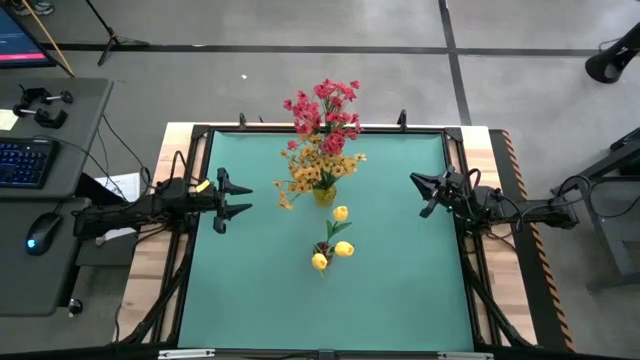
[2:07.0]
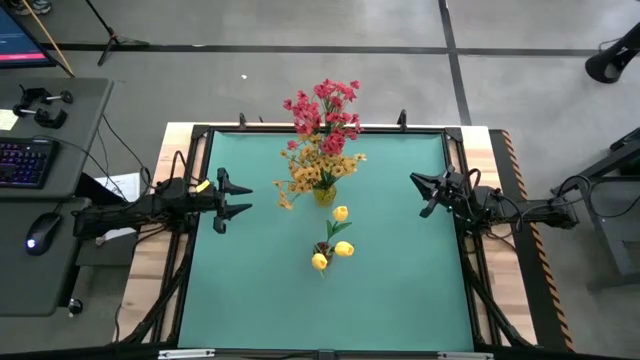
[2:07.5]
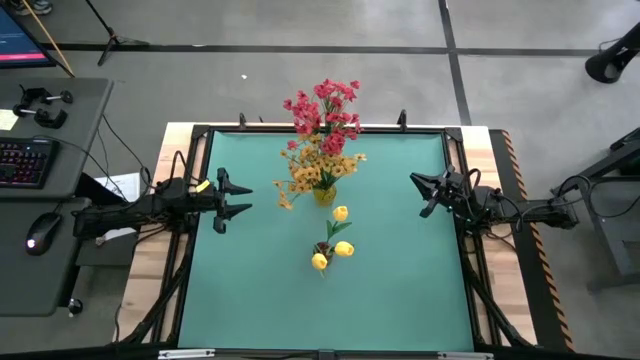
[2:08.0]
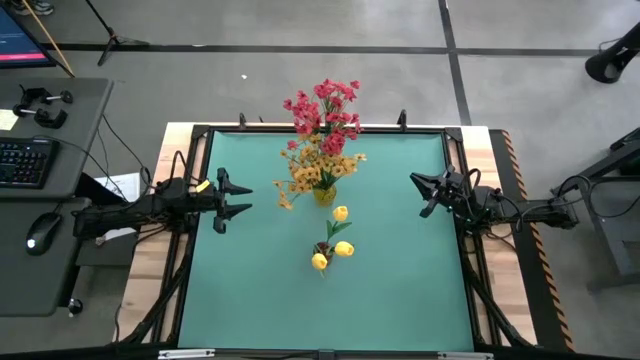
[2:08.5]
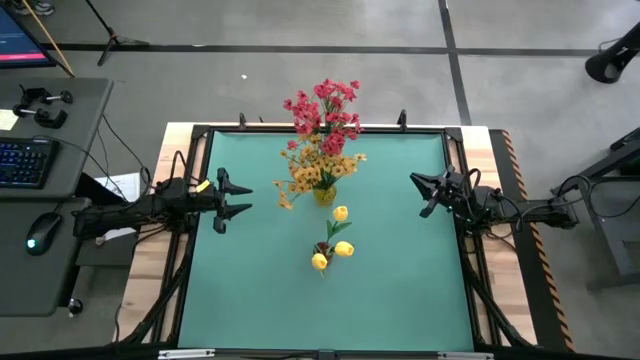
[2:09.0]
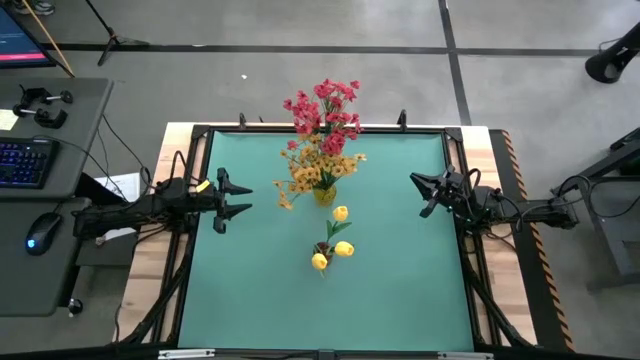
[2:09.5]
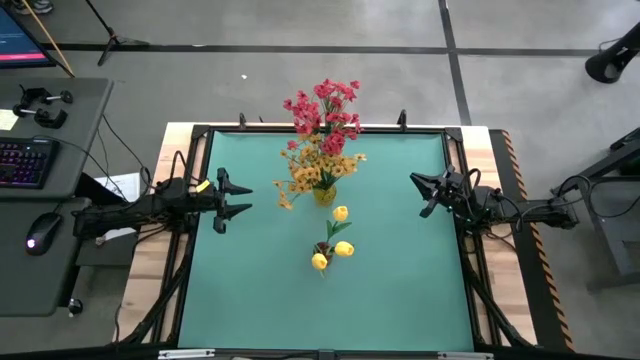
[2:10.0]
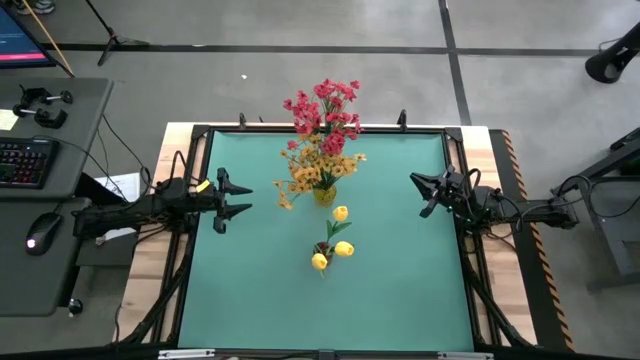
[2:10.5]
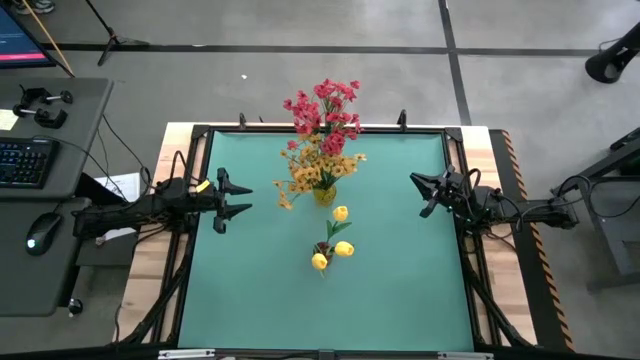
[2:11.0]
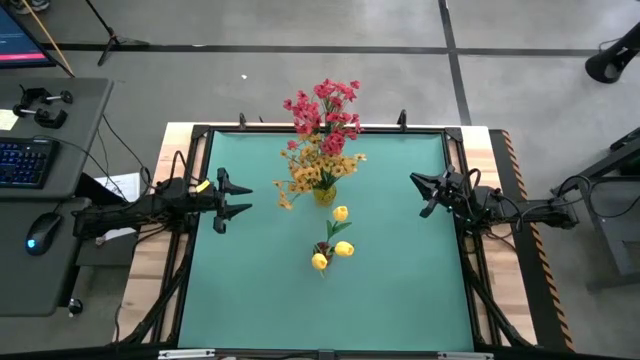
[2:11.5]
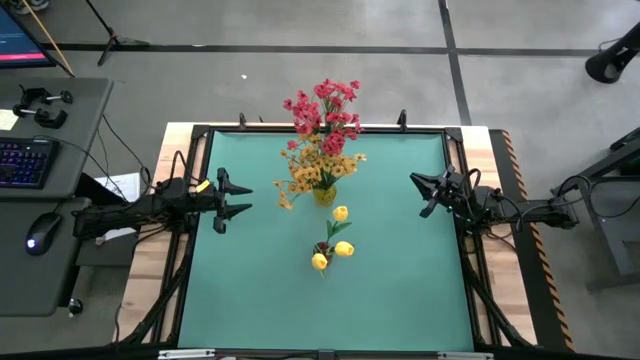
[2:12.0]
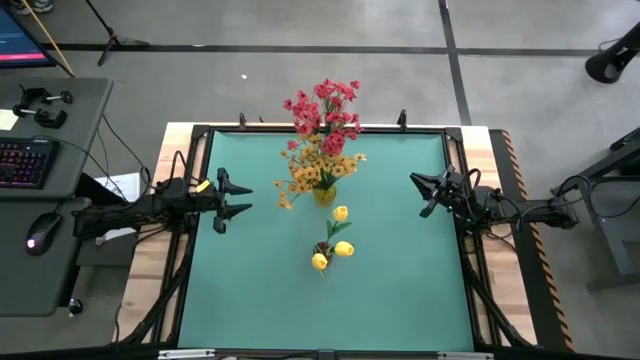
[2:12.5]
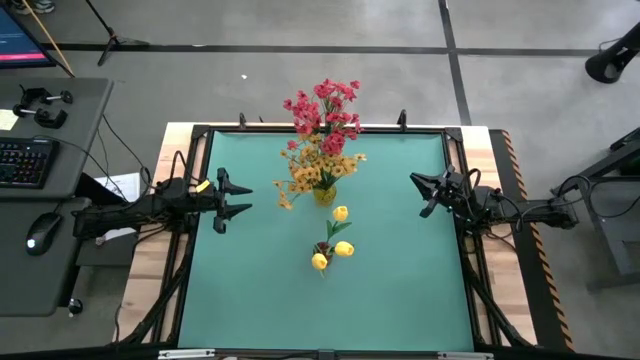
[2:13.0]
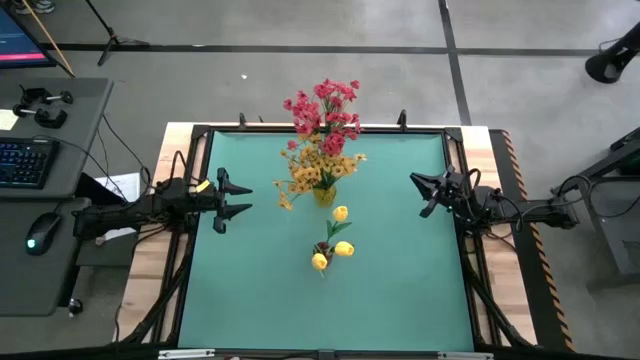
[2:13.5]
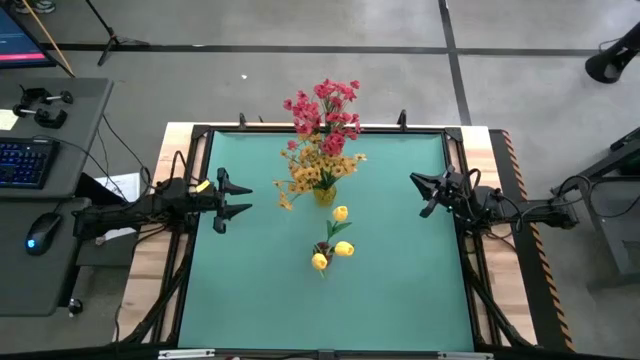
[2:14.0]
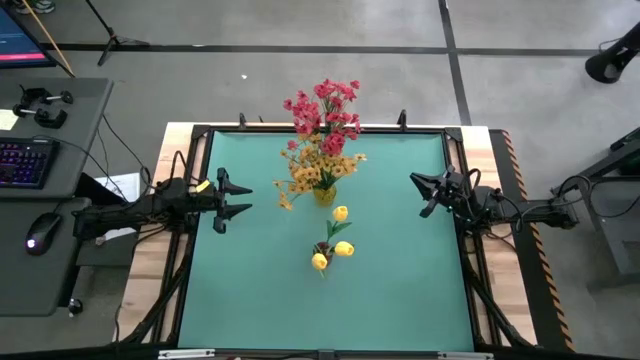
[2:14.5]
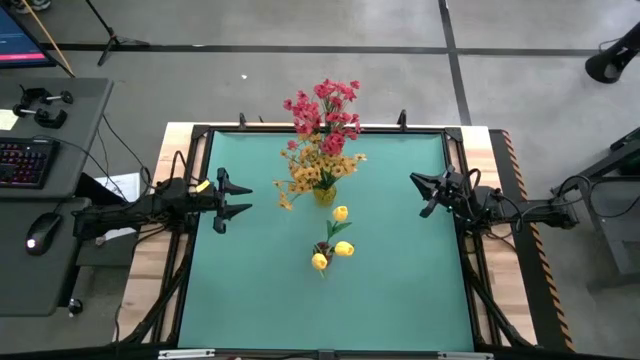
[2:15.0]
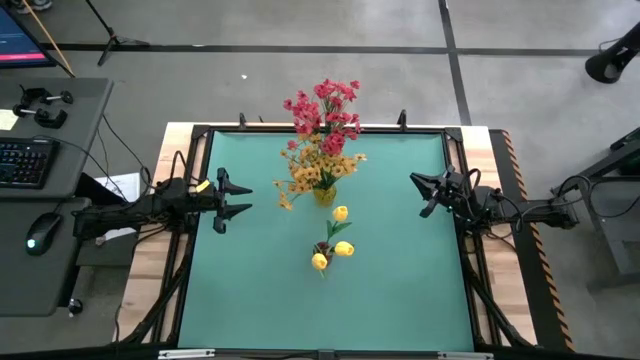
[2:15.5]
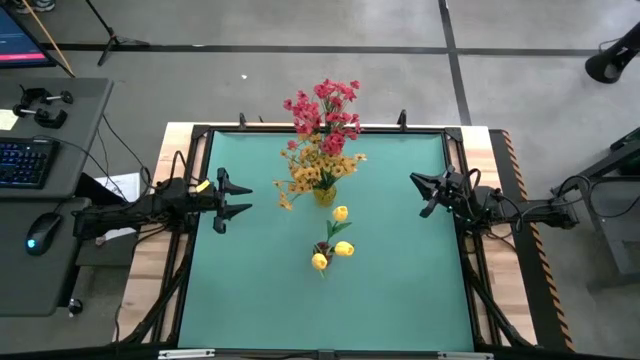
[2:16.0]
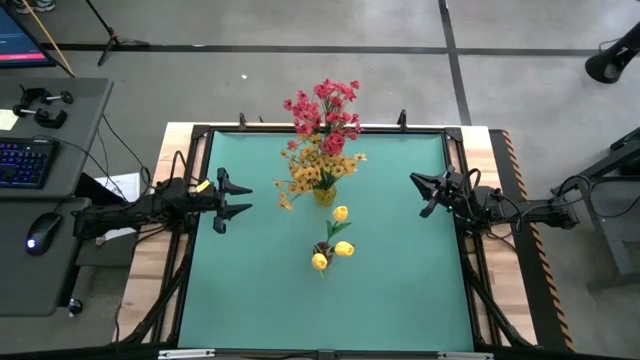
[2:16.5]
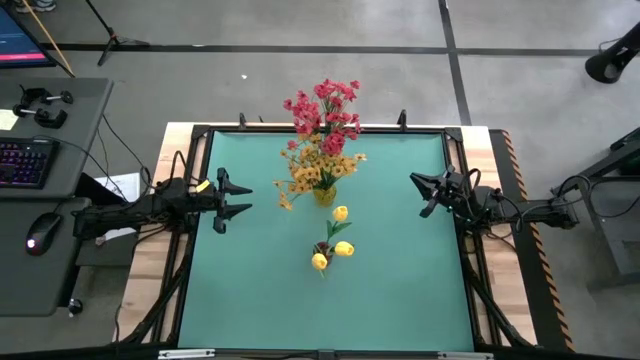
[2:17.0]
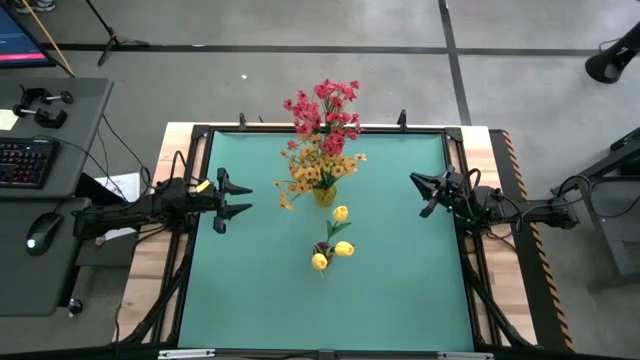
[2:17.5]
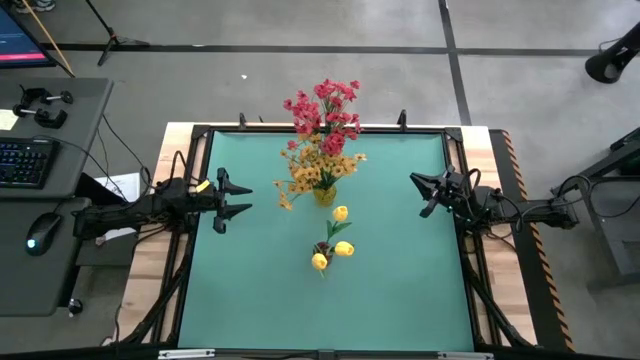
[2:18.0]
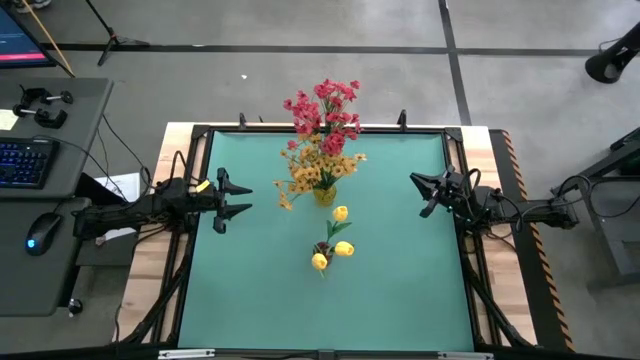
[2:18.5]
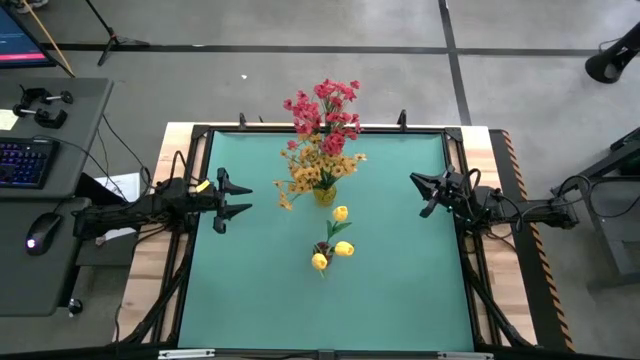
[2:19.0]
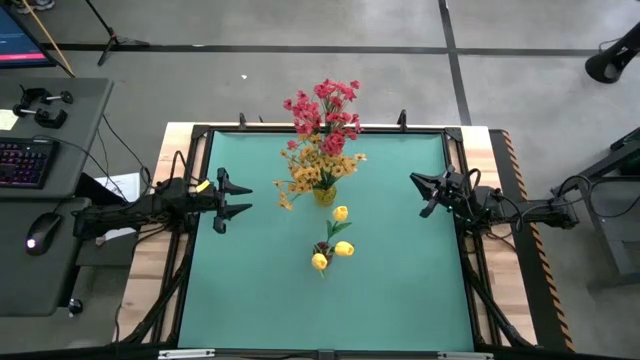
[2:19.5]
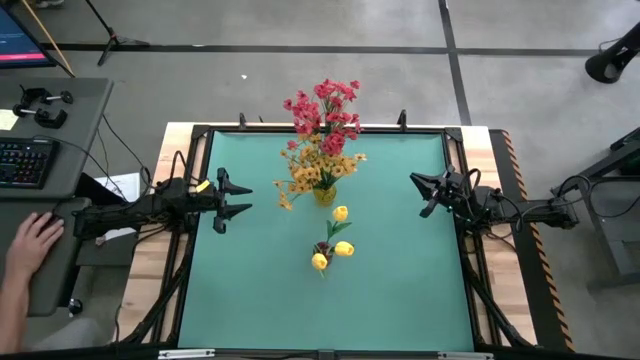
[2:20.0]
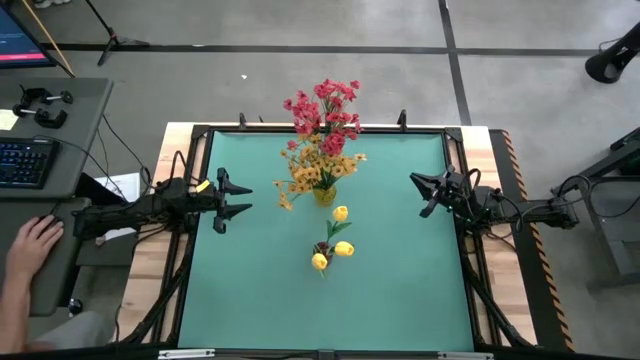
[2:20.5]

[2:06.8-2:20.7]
Task: Sort flowers into vase by color
Return to Home Position

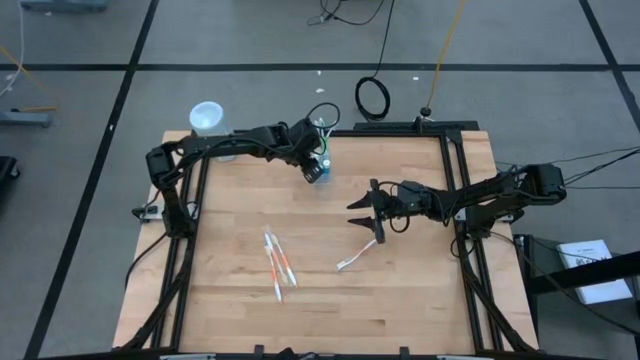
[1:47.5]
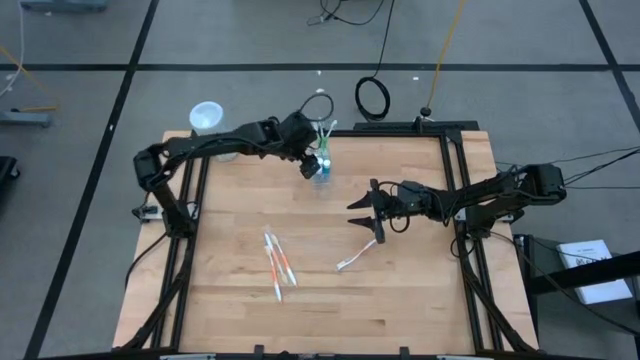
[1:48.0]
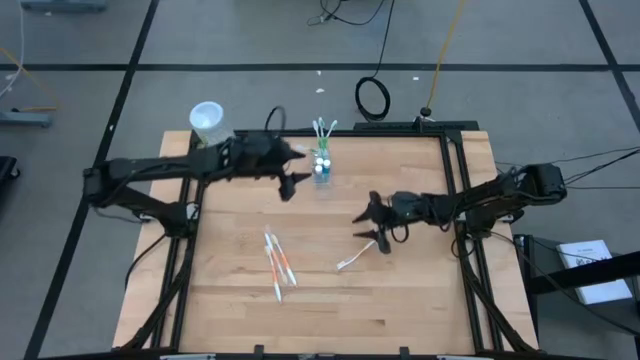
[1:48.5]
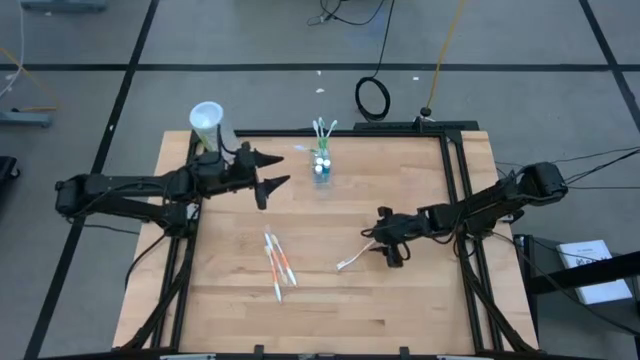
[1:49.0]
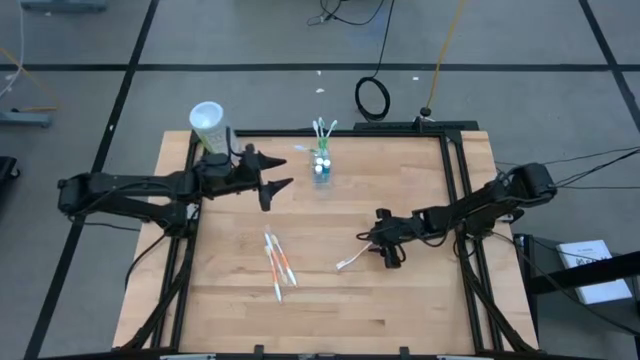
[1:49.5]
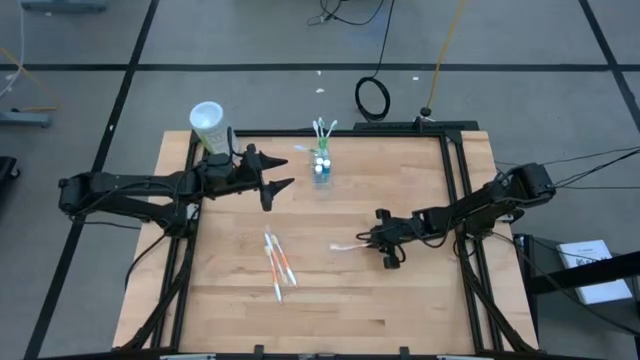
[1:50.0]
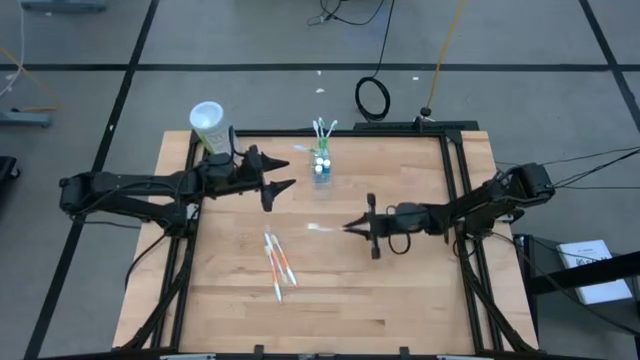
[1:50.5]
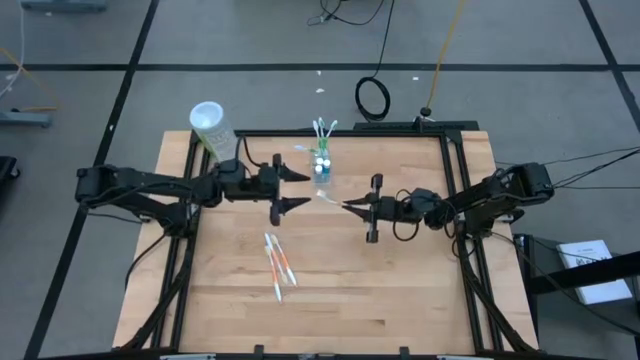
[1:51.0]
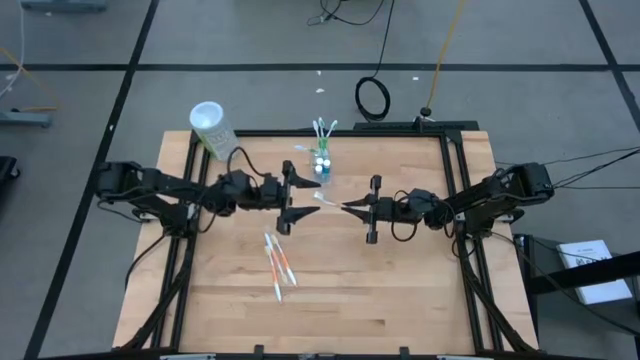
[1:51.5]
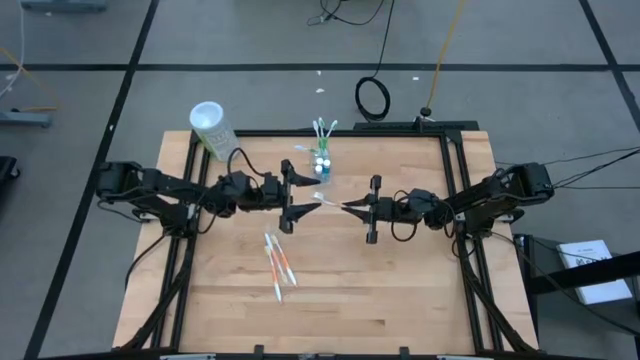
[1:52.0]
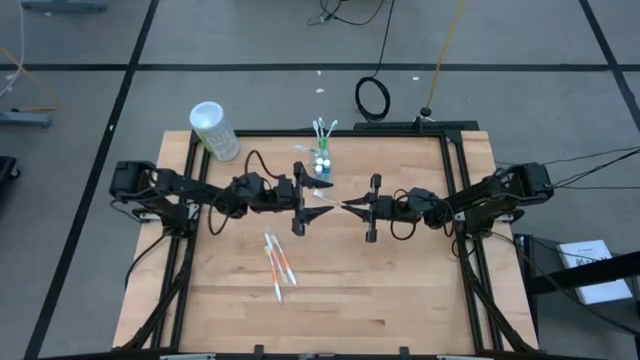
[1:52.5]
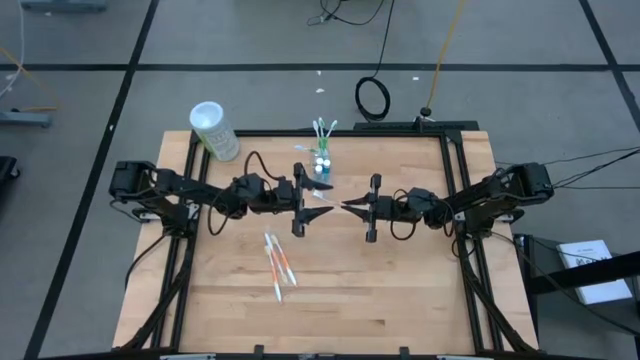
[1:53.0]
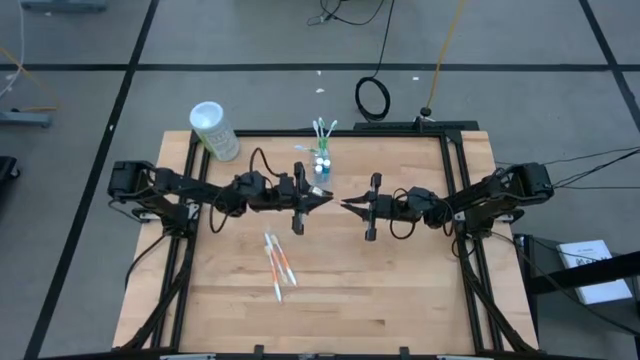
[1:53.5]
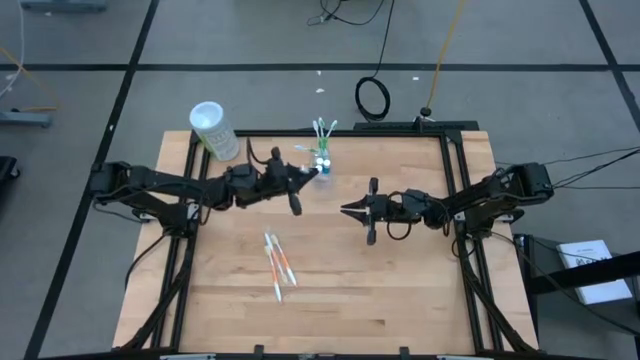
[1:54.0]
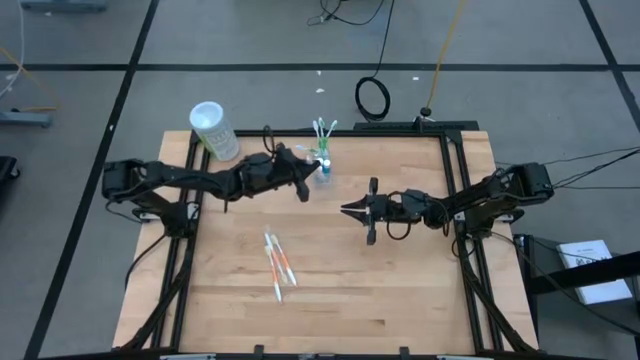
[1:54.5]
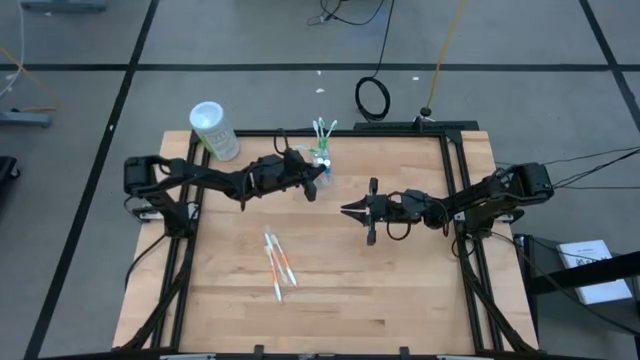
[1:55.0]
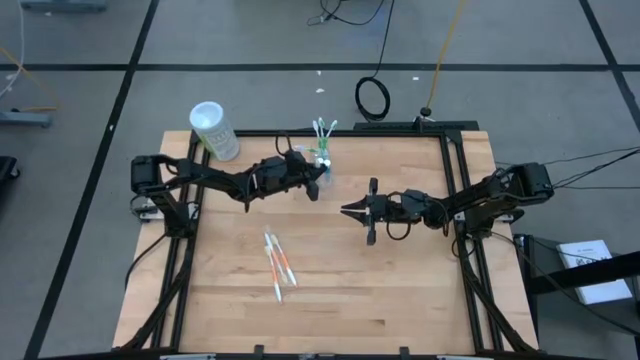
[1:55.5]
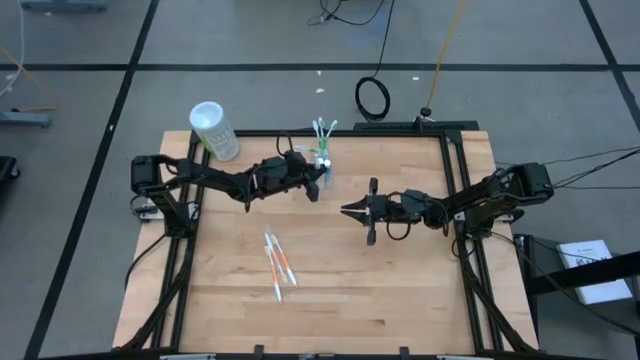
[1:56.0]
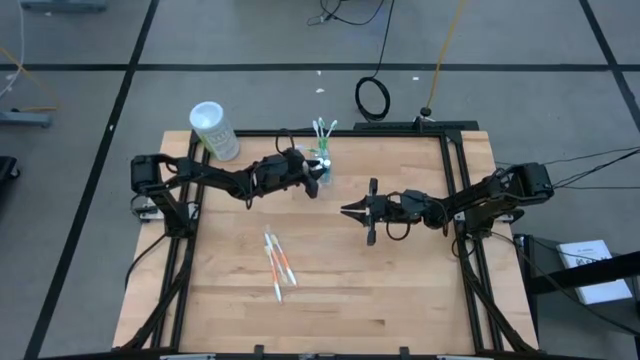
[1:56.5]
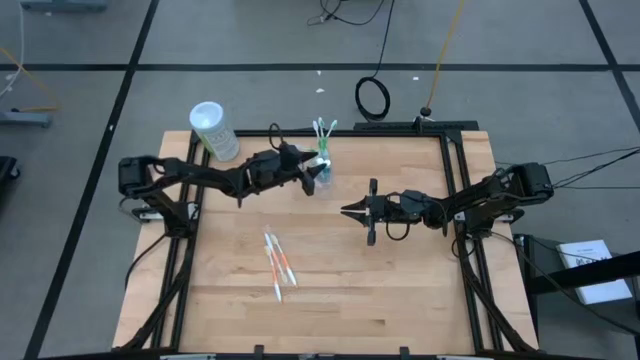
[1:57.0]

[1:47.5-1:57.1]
Task: Pick & Place toothbrushing station
Put the orange toothbrush into the transparent organizer
